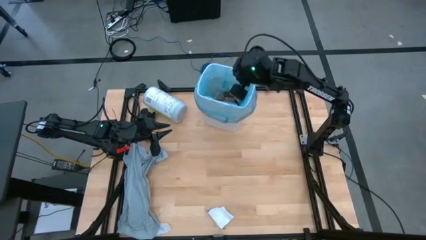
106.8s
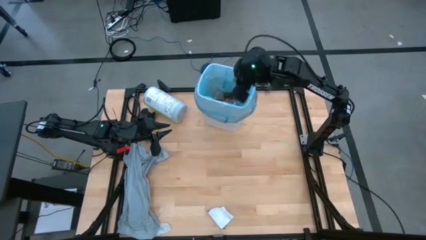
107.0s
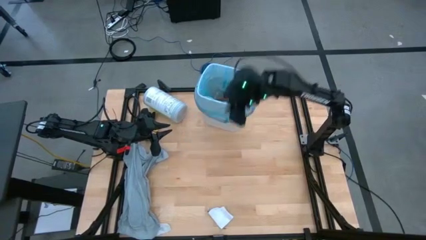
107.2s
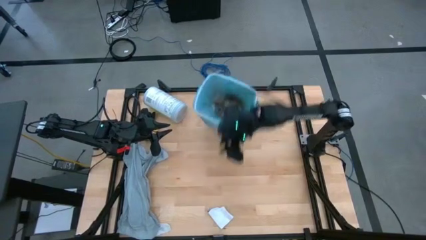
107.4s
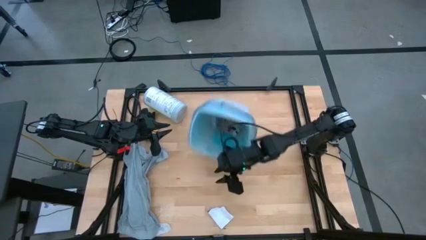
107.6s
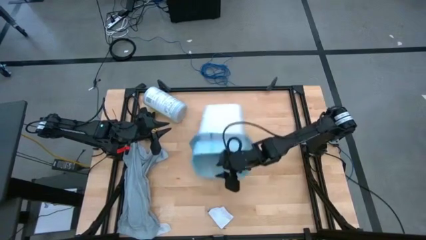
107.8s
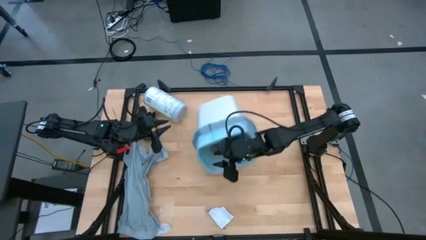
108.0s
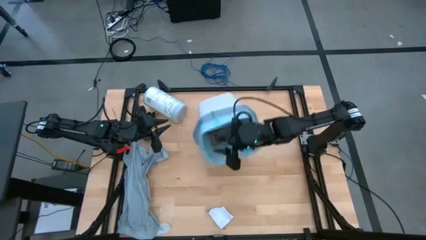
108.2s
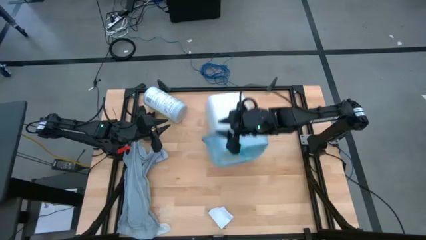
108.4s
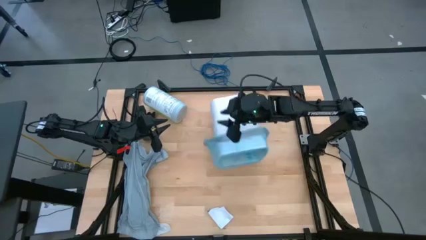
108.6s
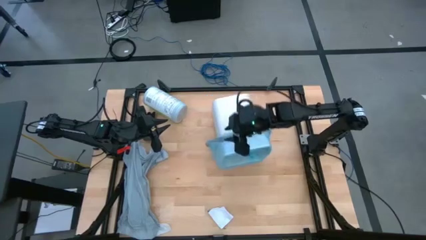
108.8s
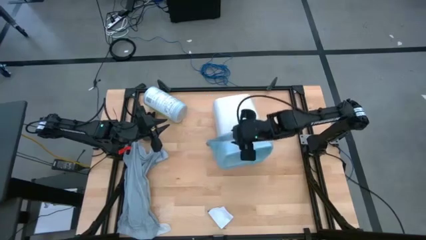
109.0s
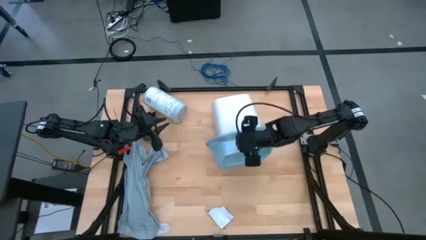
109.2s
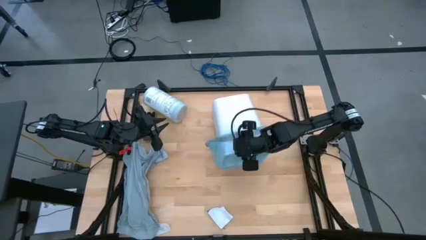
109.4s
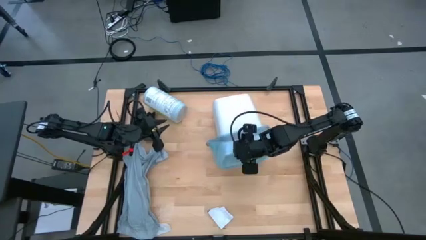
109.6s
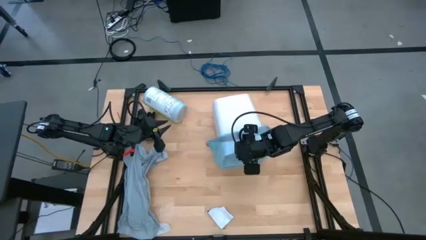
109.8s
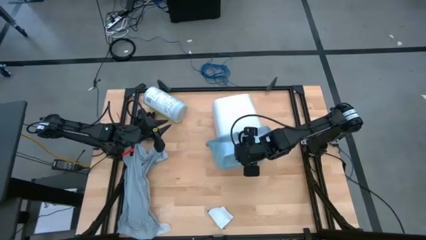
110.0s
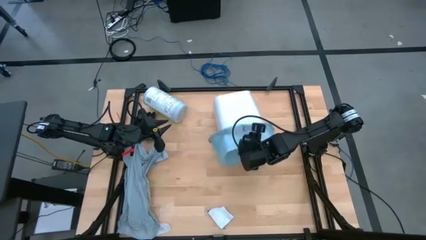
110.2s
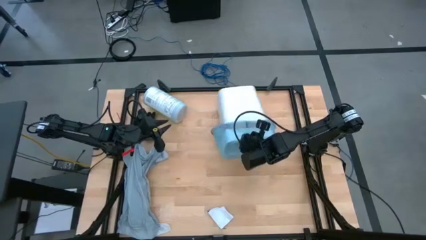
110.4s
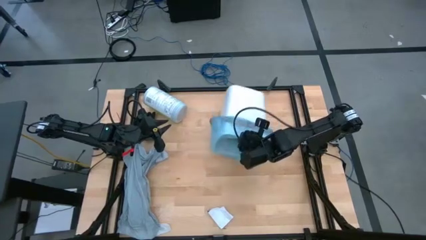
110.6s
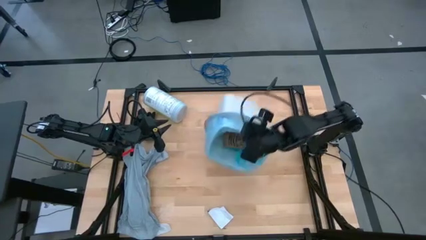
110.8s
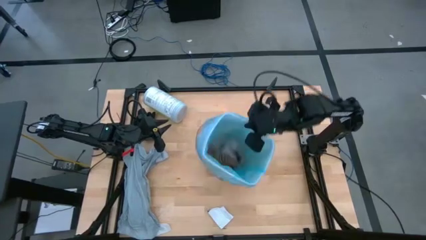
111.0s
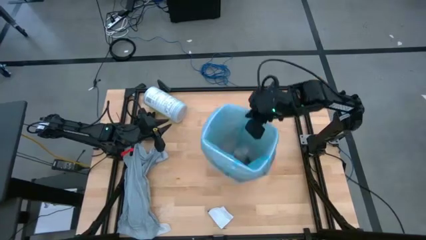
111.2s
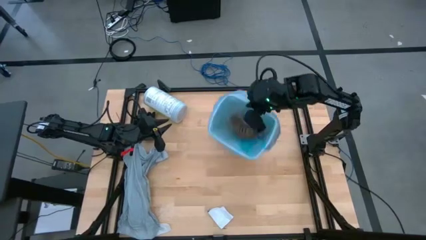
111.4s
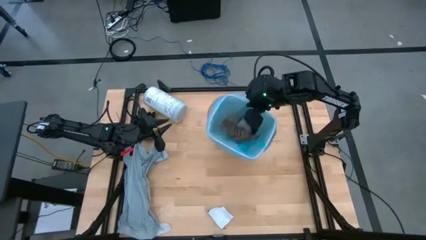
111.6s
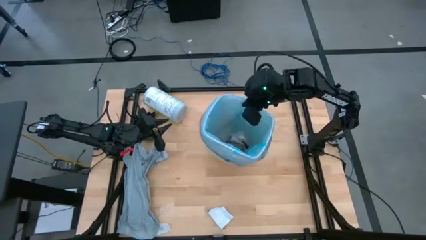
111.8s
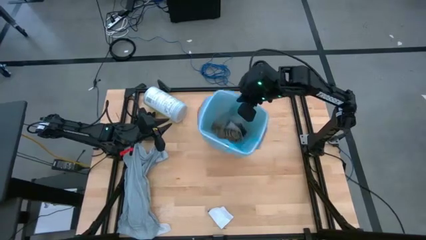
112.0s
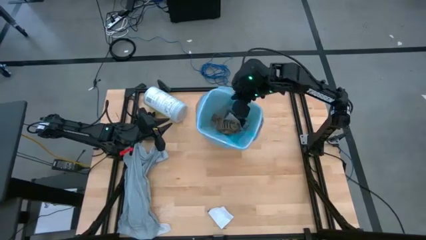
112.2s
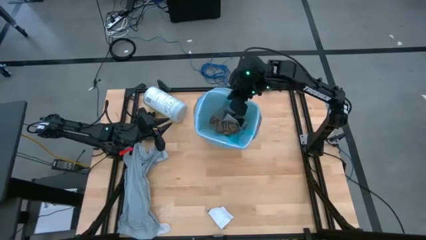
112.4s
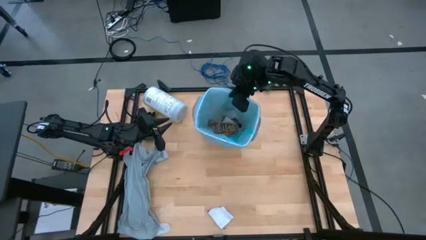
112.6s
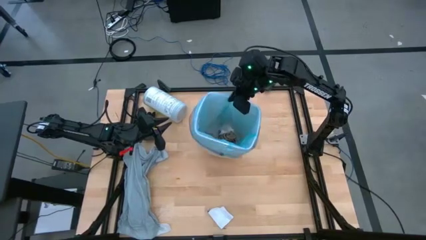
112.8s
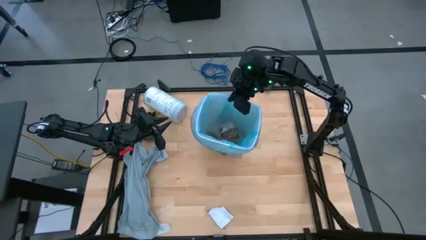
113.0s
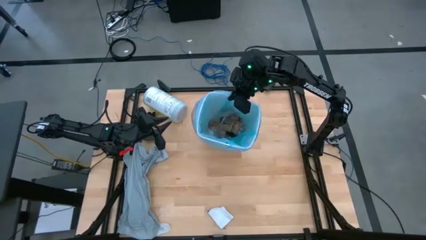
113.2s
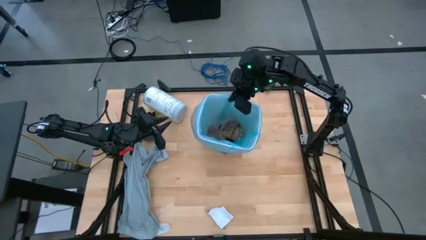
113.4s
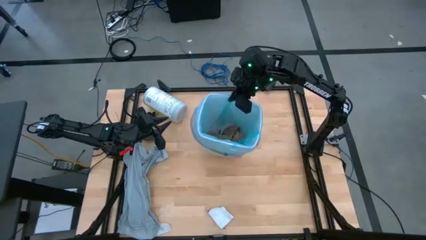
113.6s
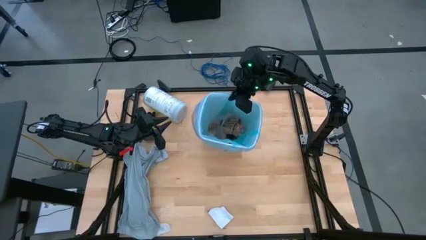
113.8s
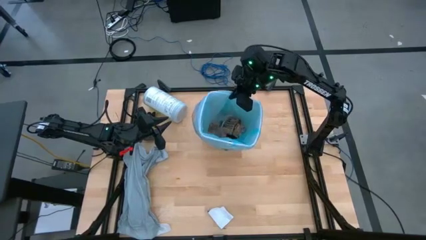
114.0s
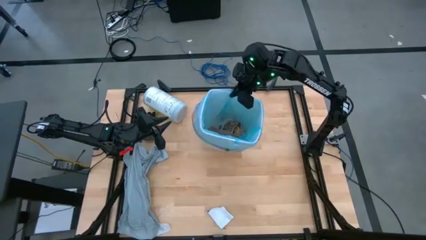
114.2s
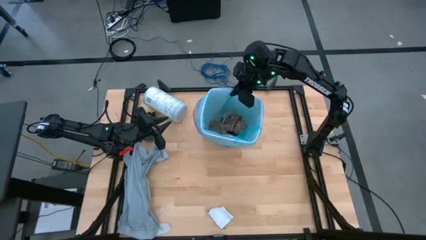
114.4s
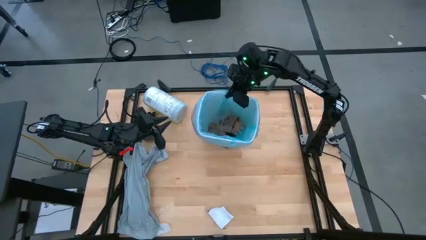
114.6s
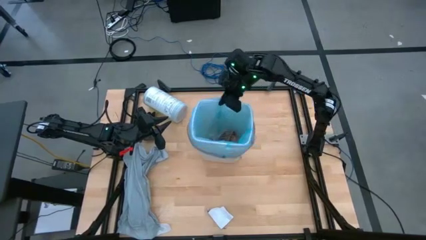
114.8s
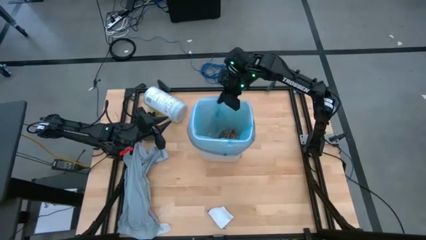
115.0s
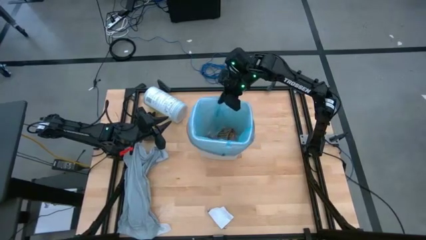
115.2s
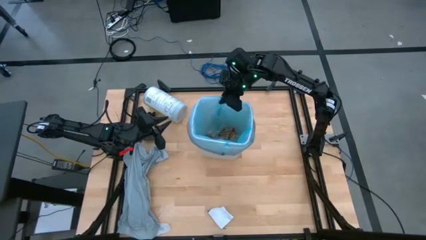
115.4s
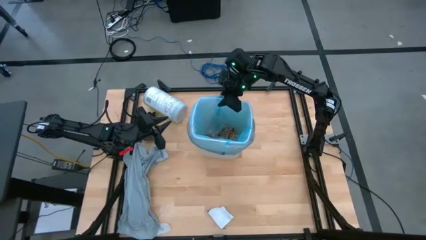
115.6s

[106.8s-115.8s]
Task: place trash/remove bag and relplace
Adjust the trash bin

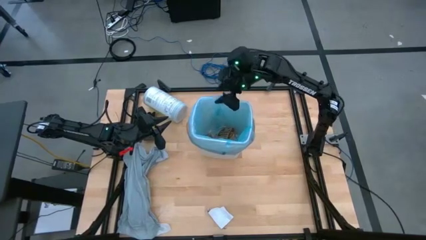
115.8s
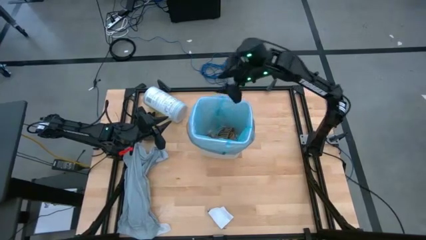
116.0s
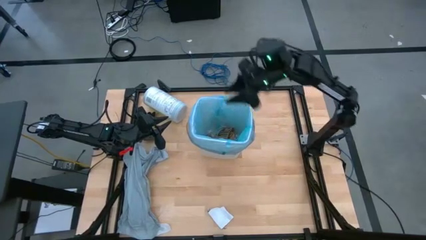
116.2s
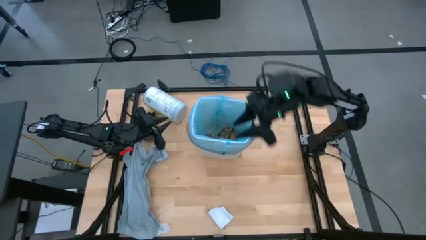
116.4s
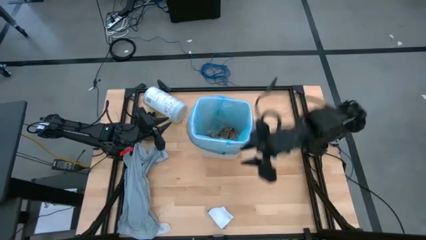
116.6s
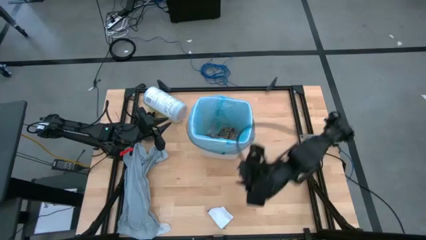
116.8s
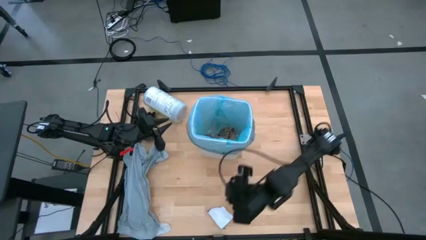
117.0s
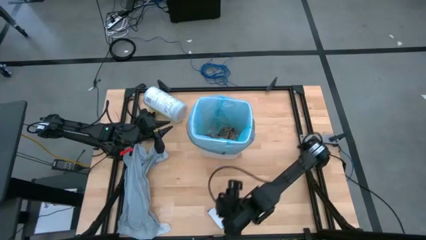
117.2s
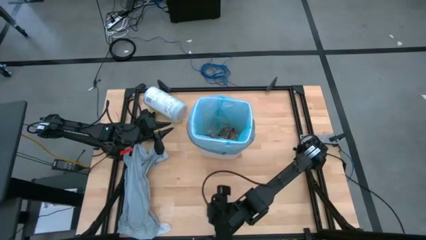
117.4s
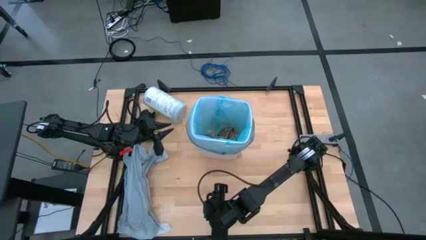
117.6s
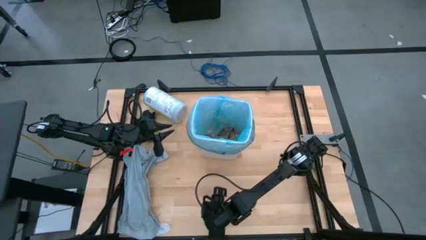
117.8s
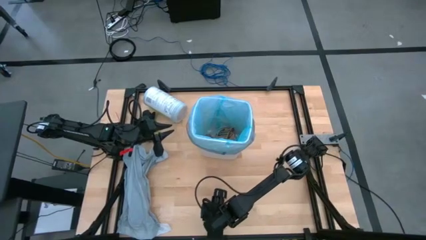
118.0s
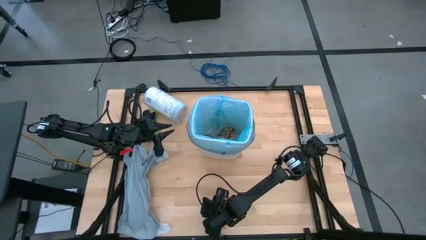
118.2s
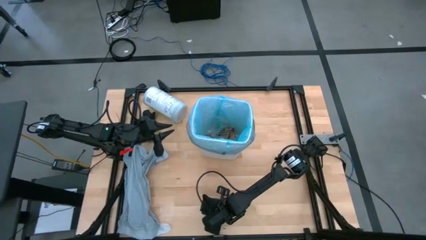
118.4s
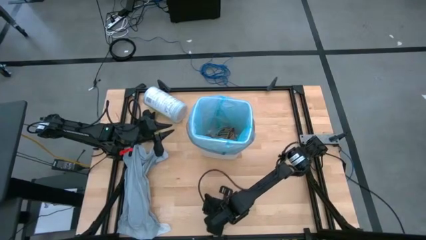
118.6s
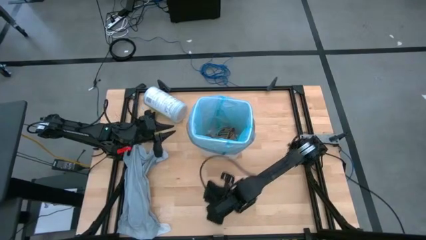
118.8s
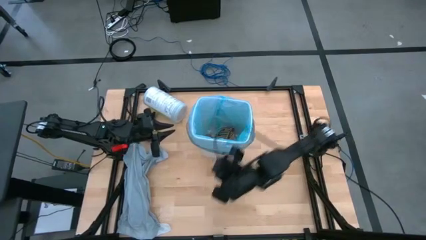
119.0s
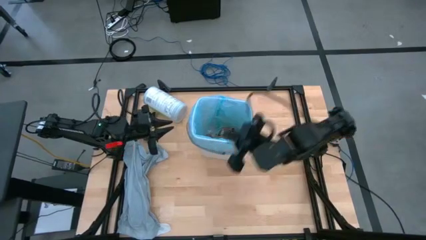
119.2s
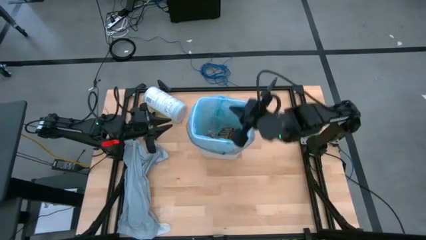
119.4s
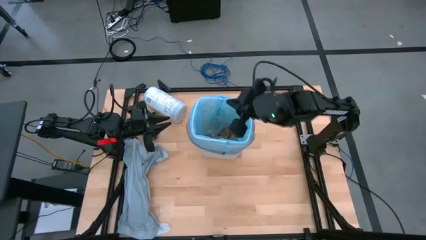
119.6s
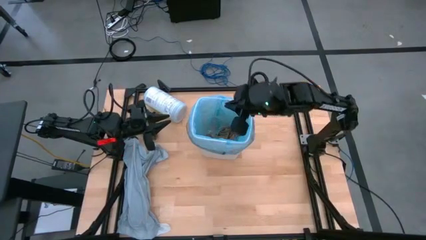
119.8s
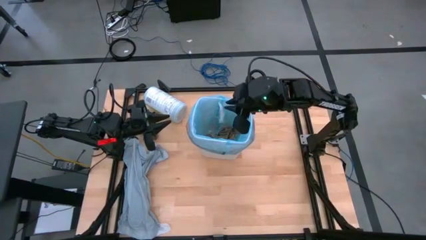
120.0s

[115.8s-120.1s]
Put the white paper into the trash can

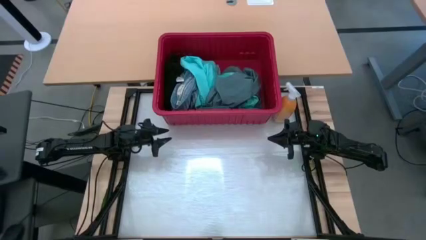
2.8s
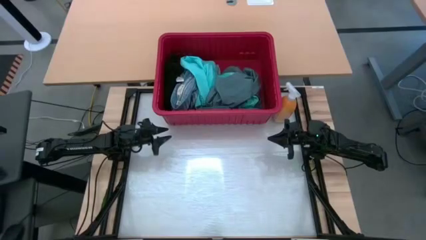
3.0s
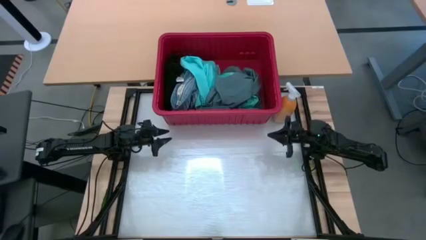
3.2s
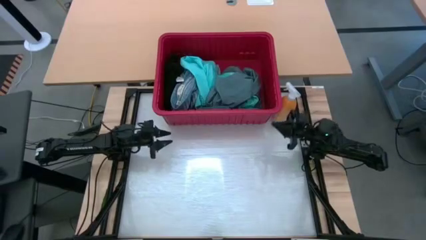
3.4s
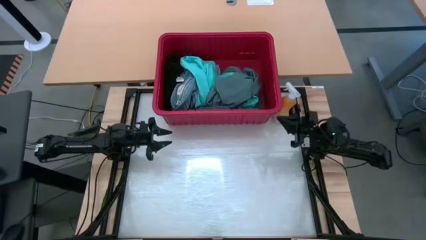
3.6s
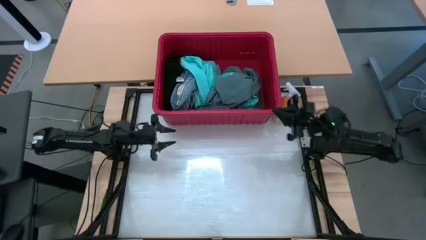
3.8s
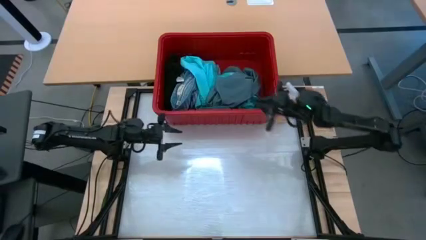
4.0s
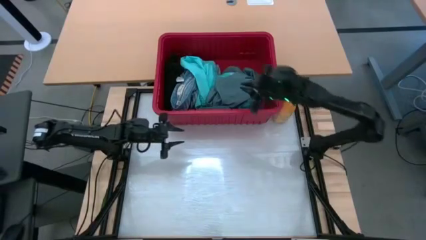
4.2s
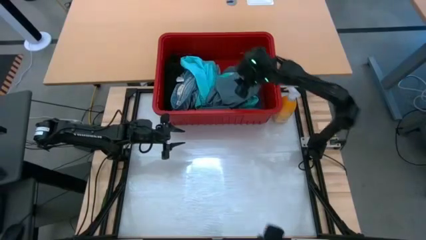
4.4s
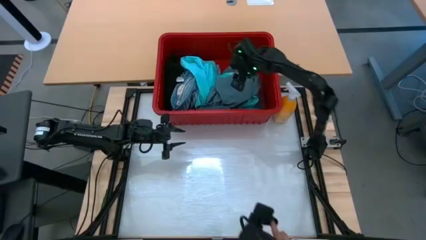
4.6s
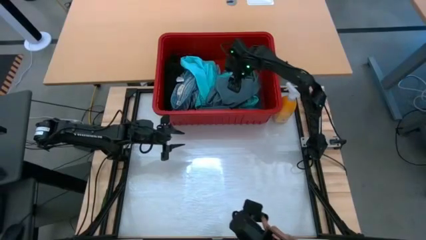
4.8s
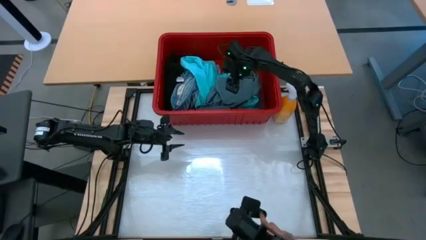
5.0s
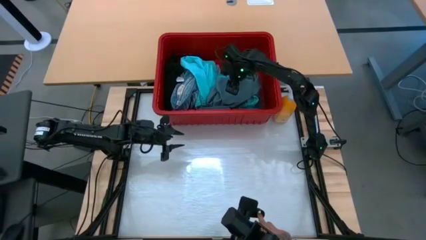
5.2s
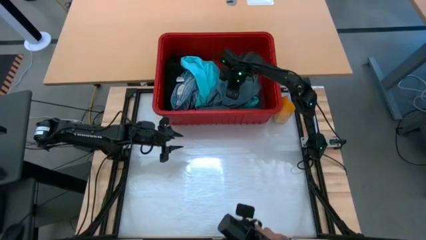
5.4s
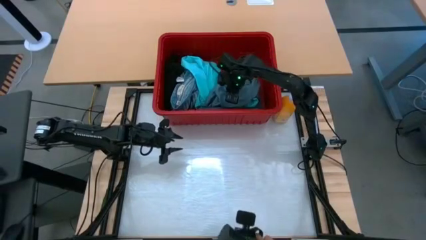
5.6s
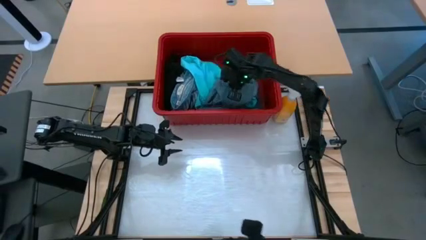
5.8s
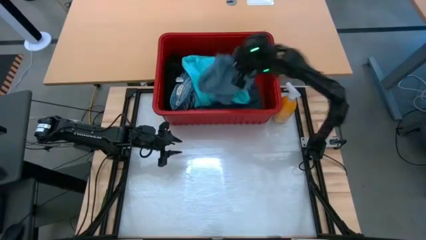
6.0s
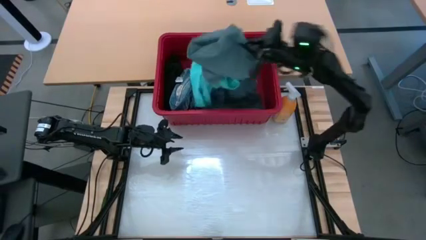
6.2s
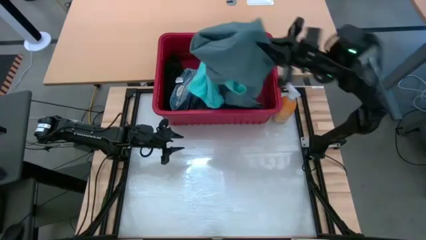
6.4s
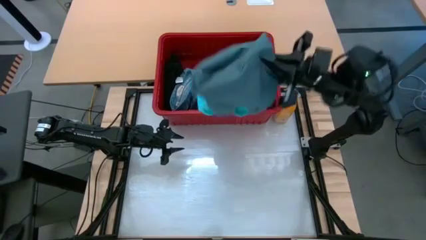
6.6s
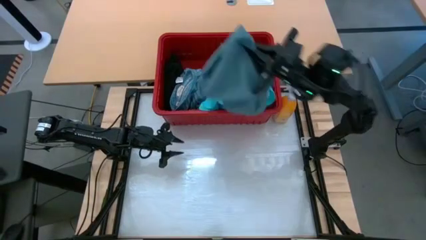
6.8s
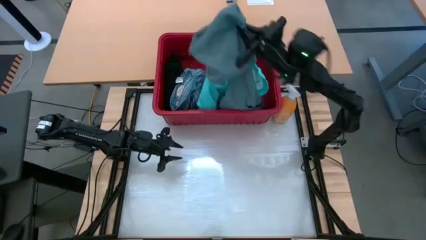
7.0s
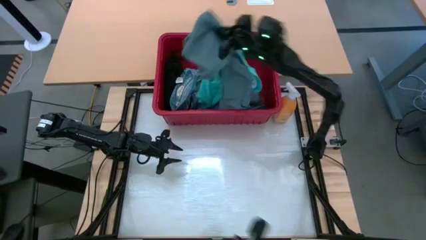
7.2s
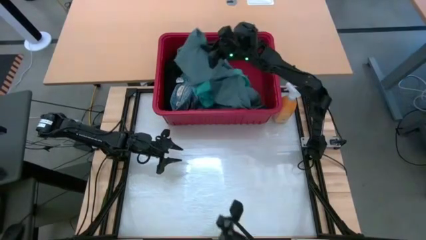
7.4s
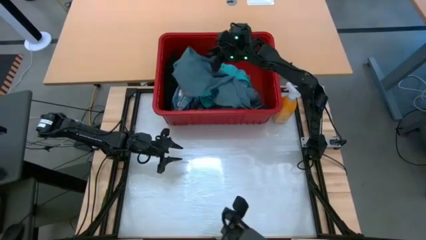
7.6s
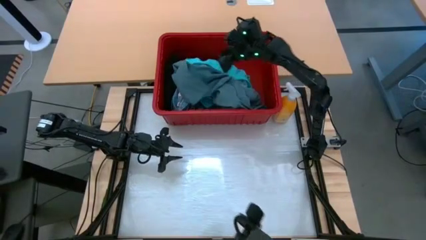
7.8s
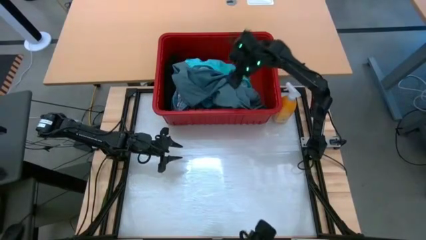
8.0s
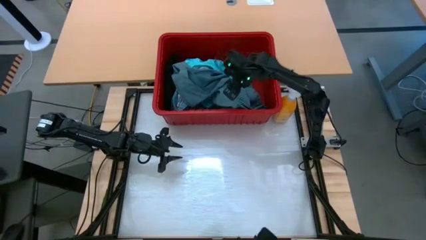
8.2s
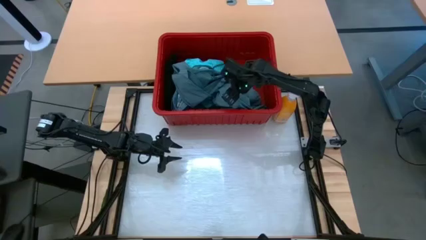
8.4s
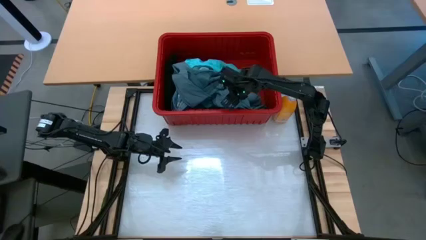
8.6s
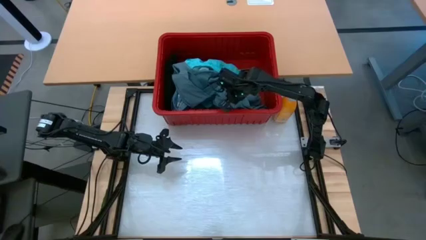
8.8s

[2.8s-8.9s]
Task: Fold Laundry from Bin
Remove the light blue pants from the red laundry bin
